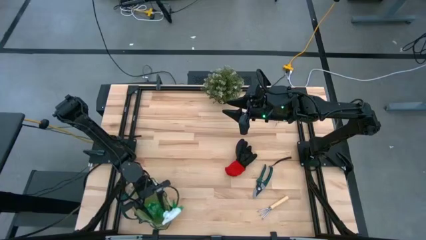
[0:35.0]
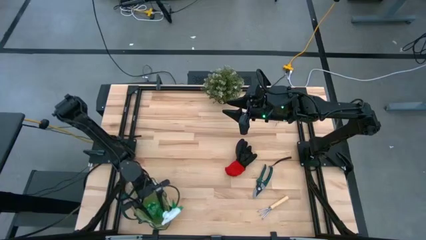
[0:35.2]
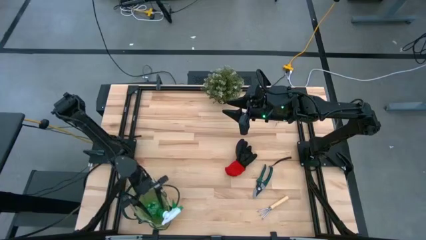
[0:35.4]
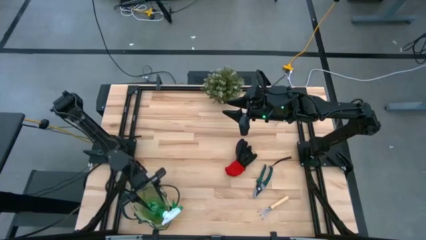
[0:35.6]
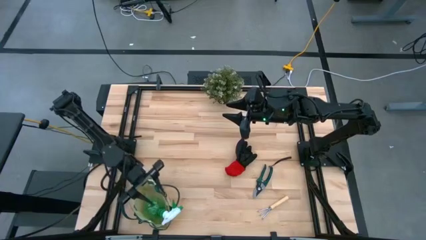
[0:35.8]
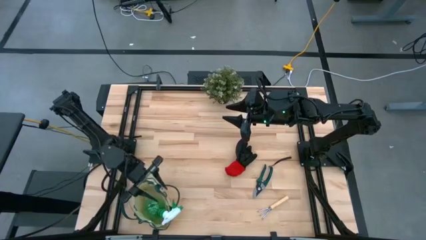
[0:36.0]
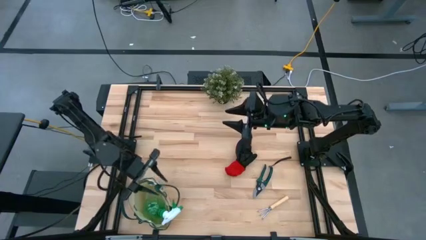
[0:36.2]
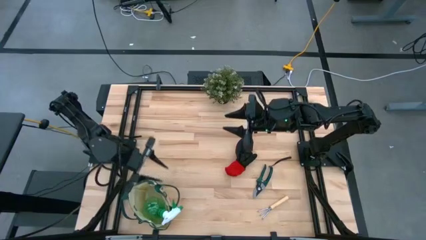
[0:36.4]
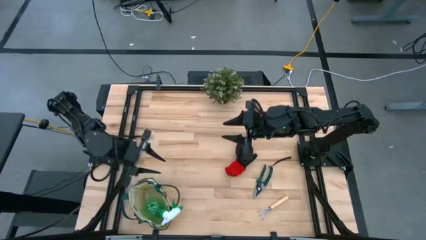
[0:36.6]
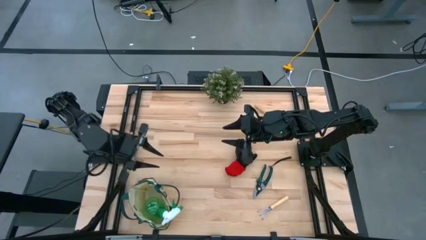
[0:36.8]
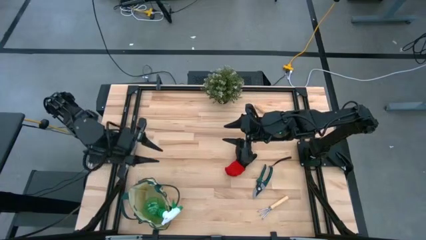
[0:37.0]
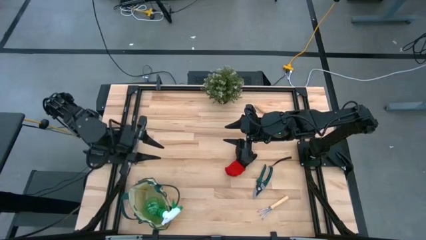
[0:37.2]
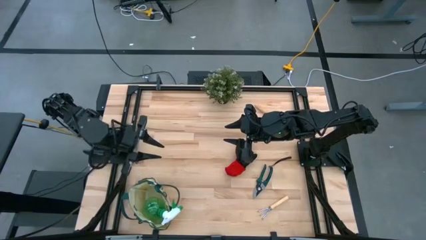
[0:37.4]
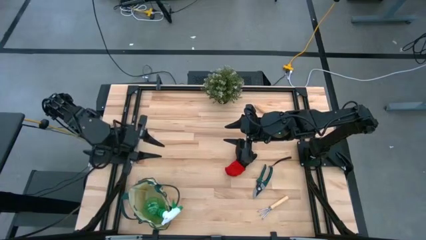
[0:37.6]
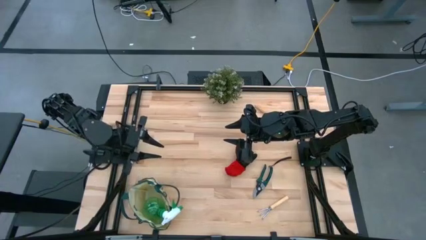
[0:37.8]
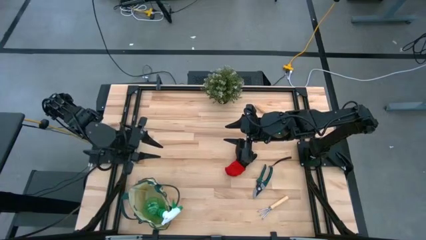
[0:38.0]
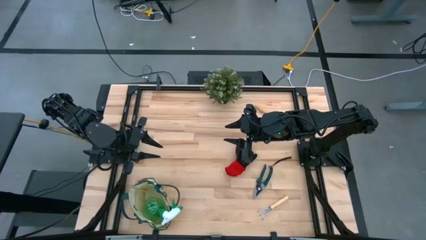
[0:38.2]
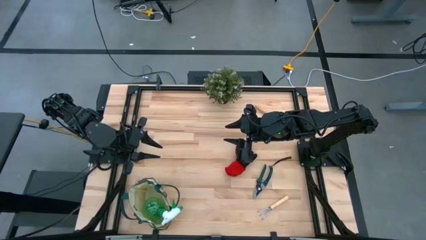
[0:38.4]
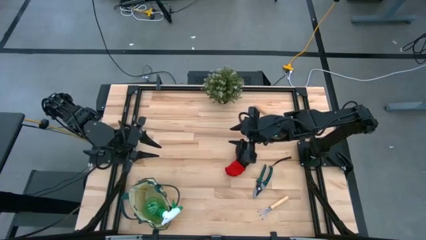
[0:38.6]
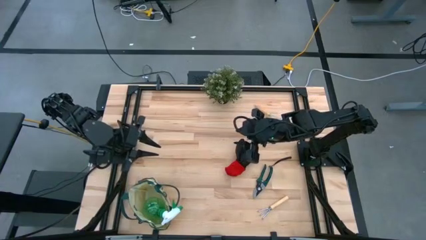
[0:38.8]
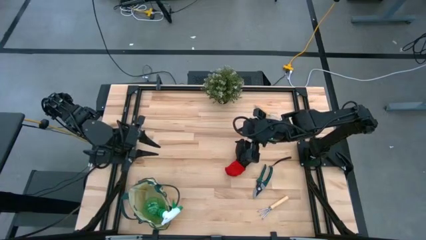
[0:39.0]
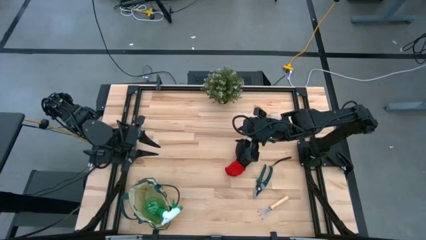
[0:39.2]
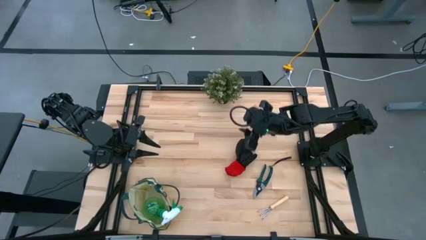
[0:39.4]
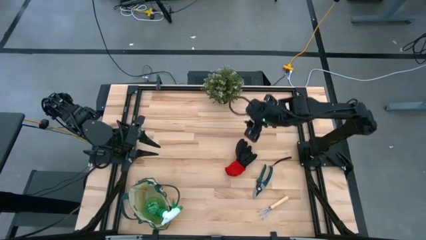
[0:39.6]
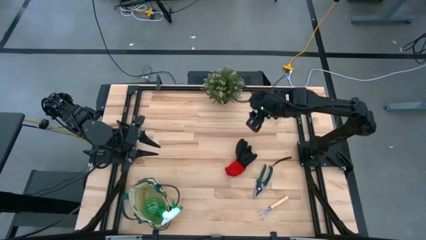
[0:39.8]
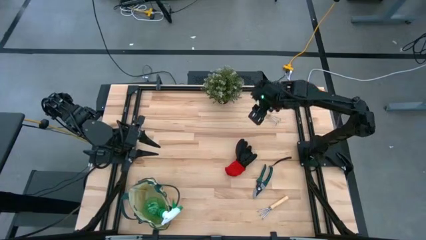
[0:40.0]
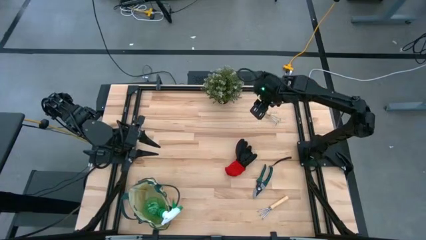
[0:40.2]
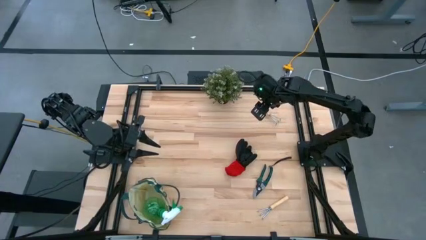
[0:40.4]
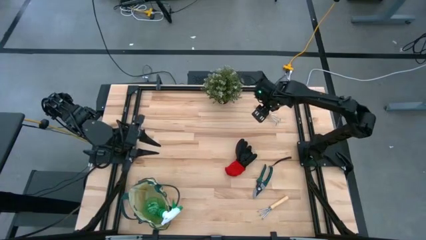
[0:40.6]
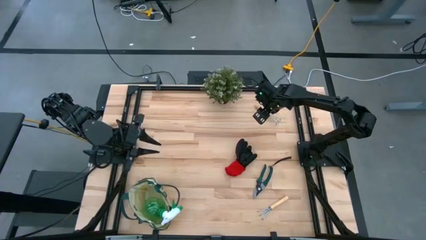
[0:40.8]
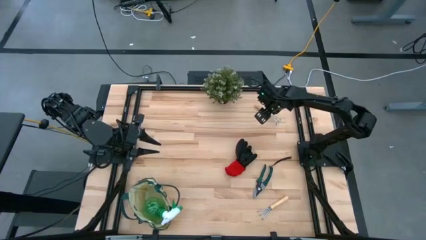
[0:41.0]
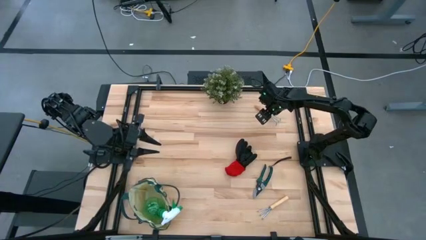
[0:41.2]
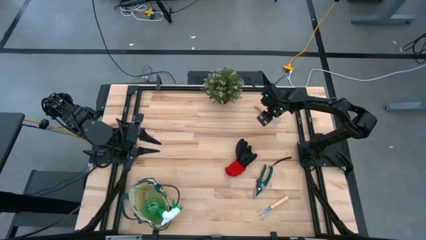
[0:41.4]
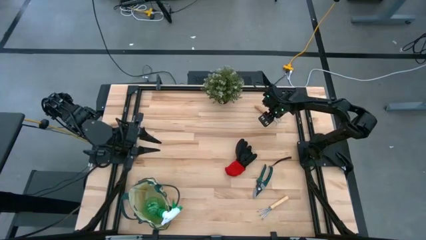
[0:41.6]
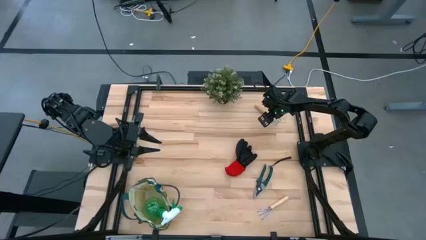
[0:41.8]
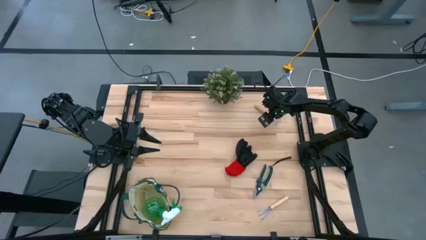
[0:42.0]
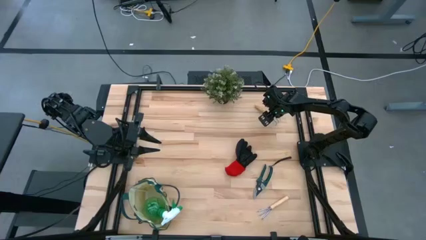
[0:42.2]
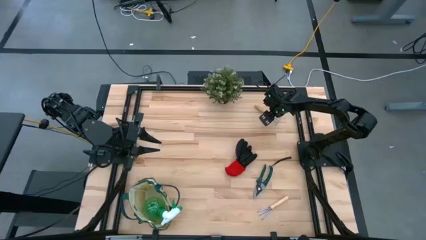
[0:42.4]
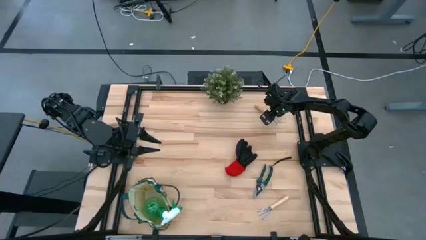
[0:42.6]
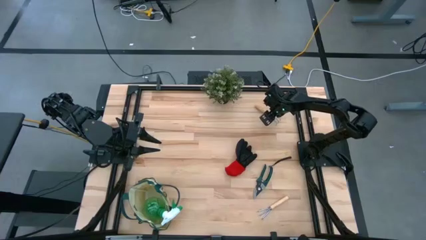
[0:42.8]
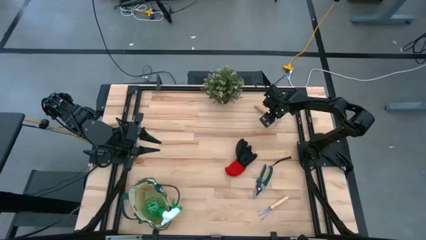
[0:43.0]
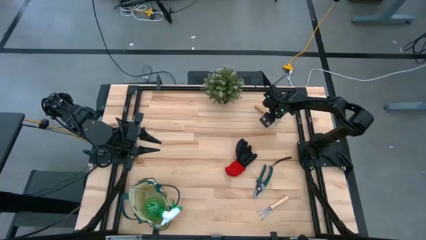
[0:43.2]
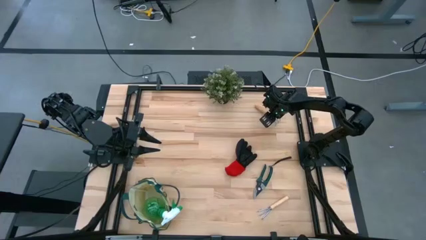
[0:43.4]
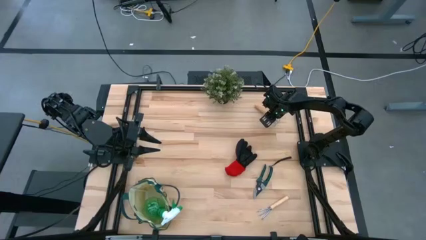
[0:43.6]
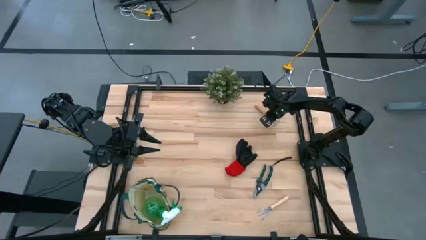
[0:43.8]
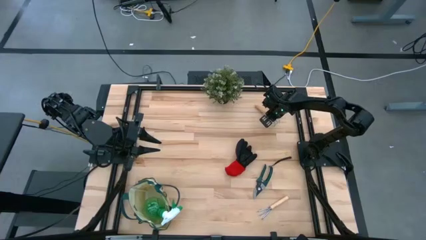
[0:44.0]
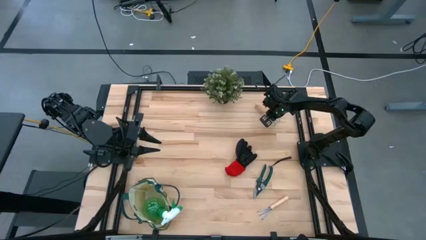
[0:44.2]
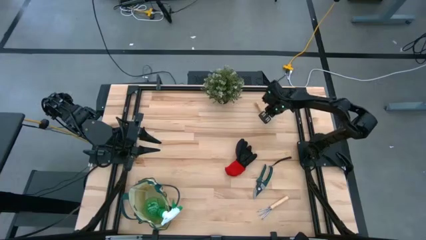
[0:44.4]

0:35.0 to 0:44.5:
Task: Pick & Place Garden tools in Gardening bag
Put the brown hand rake into the gardening bag

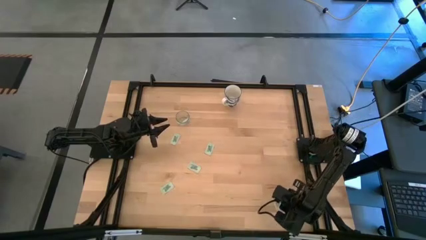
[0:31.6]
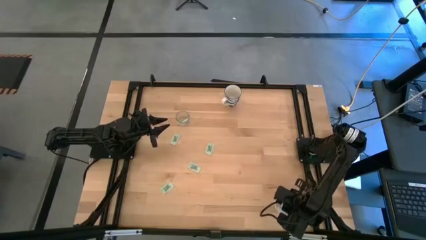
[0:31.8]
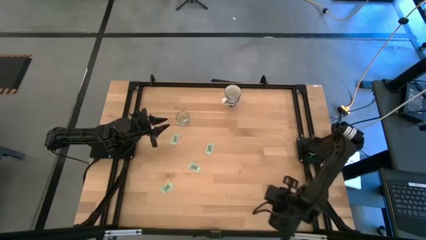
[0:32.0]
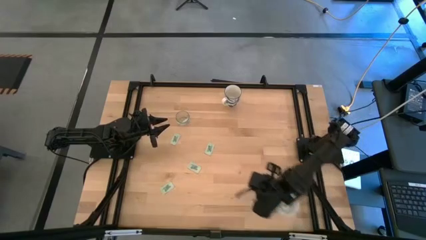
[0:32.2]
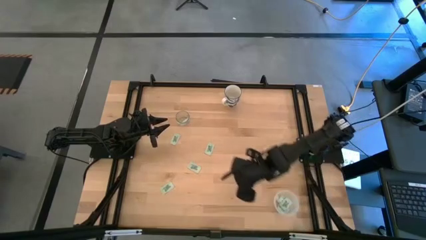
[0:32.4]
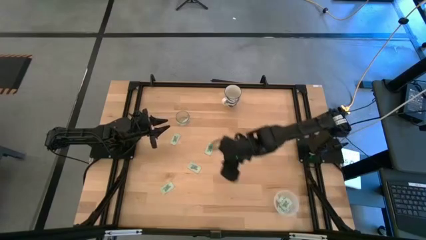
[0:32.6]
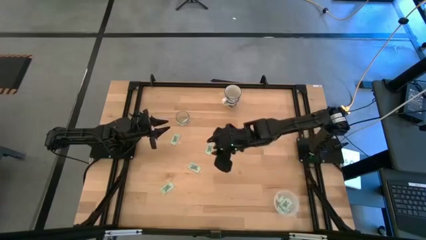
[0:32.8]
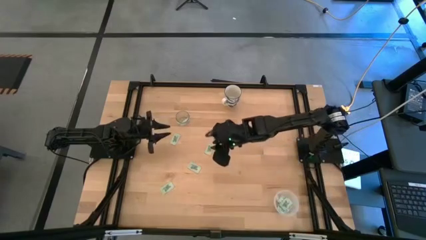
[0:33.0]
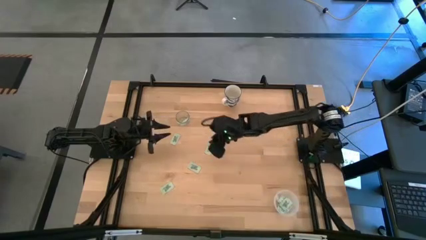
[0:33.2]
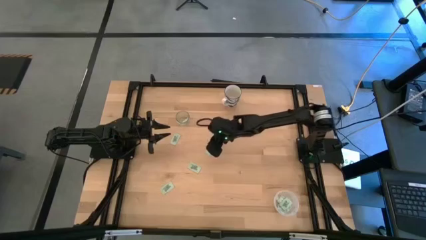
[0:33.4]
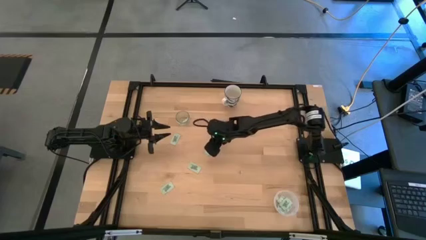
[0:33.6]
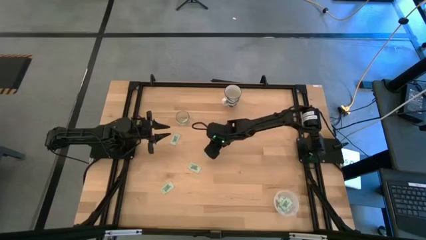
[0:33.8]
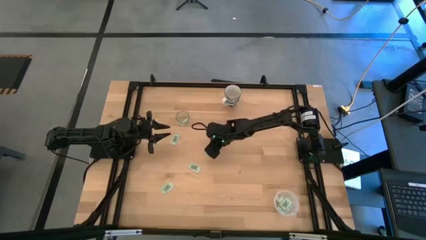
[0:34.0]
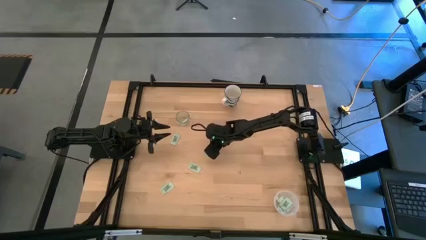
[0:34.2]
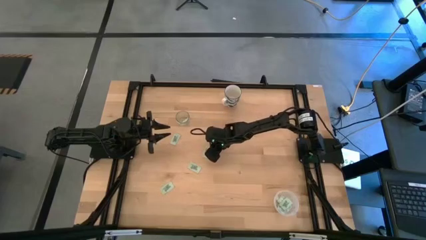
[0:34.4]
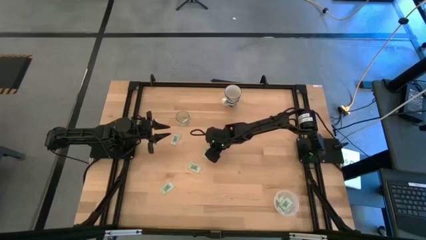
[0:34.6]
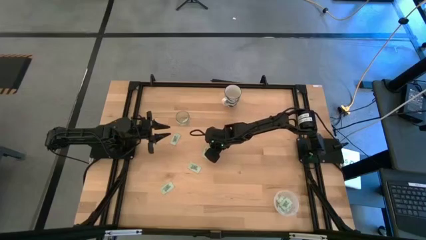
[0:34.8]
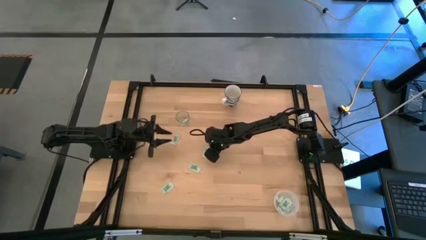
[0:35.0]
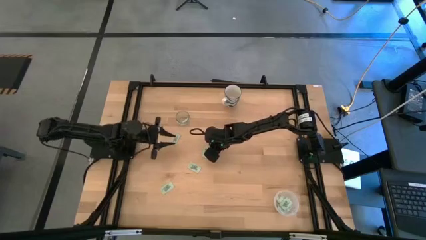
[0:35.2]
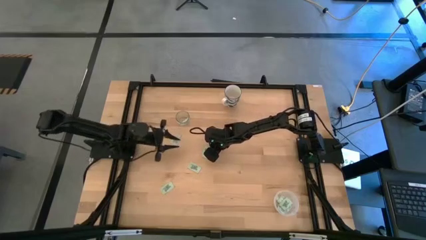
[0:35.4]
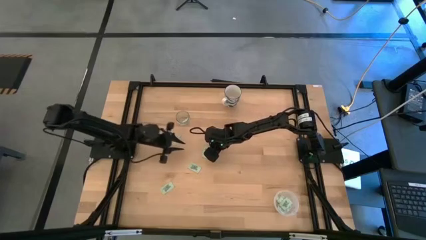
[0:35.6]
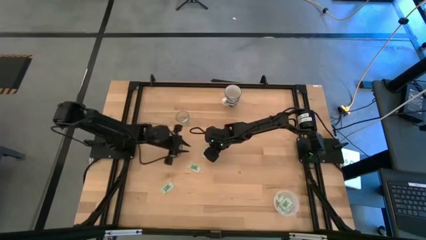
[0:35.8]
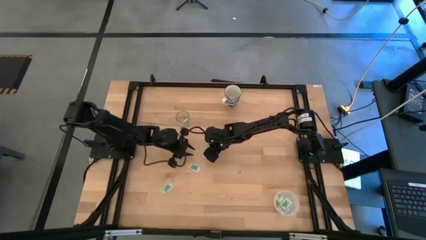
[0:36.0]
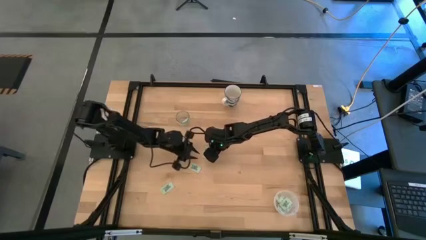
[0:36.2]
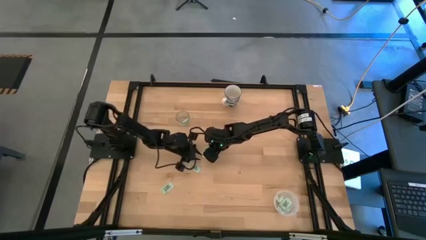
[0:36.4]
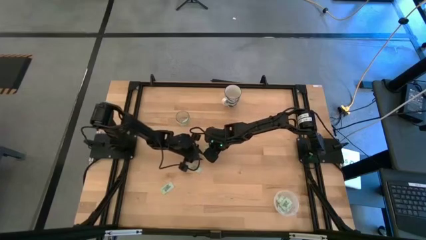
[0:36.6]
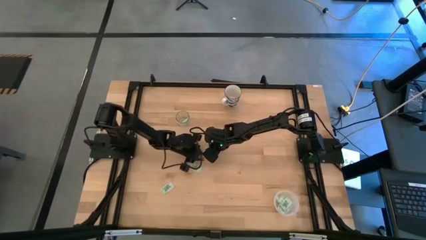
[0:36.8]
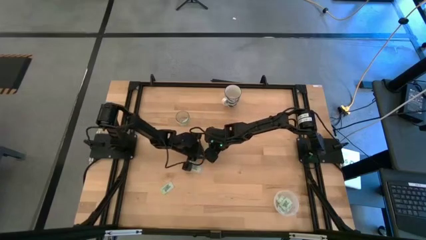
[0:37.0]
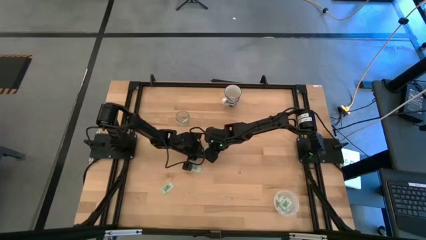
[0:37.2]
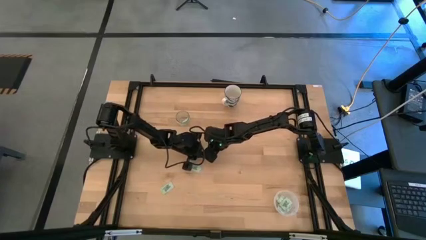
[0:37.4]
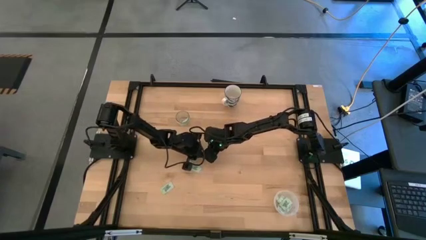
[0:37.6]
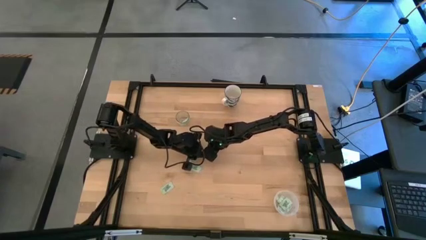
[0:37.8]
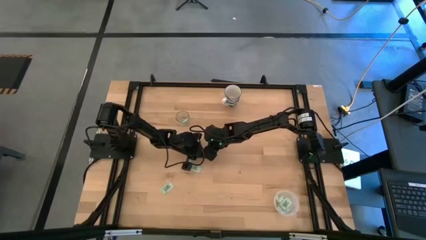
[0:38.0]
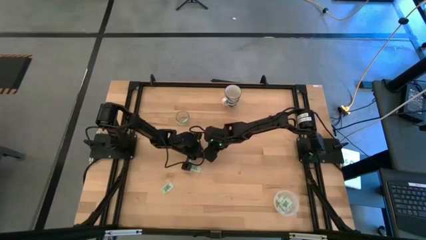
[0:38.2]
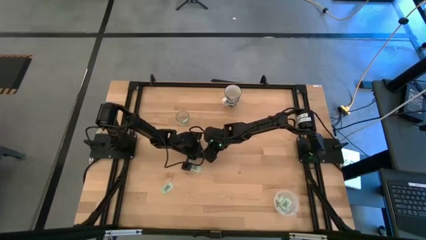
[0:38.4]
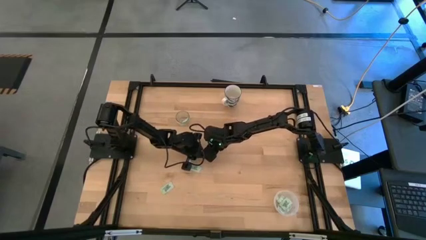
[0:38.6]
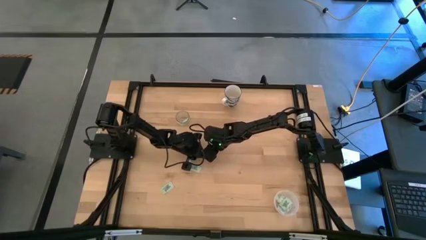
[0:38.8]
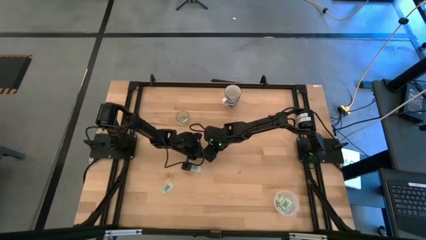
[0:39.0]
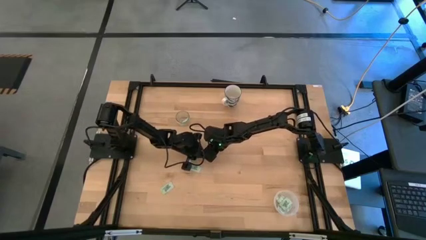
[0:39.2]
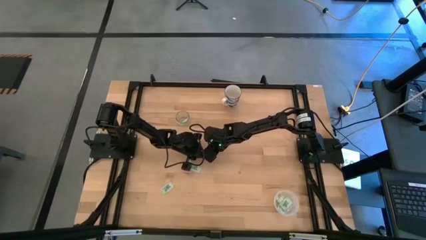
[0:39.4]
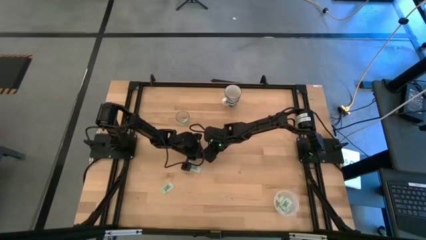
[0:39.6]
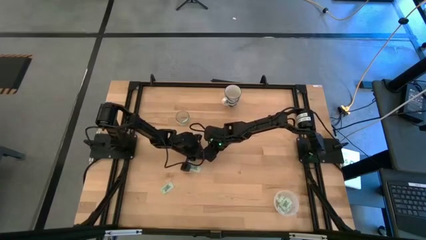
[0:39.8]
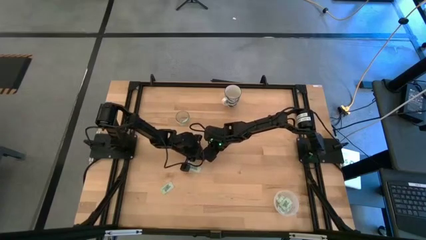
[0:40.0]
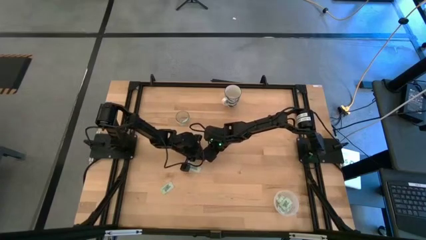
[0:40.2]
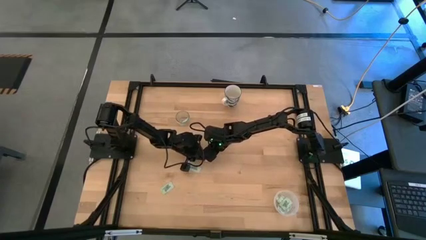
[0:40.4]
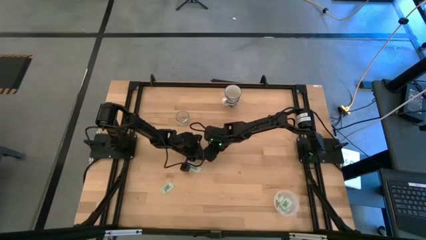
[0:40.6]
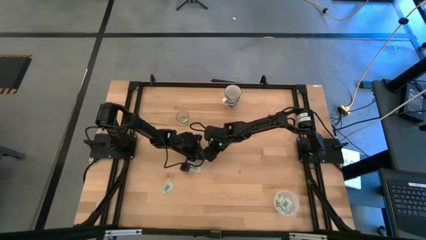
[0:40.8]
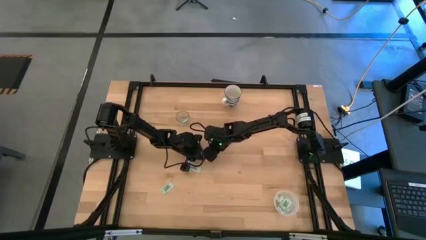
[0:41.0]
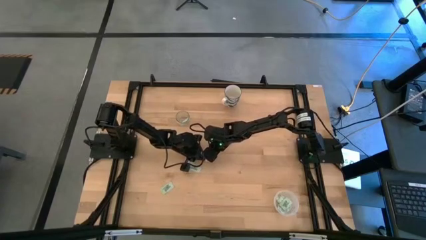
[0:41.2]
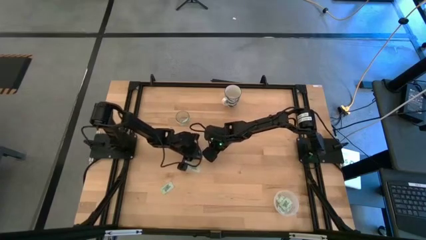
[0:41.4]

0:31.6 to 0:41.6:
Task: Pick and place Stevia / Truvia into bins
Put the green stevia packet into the transparent container
